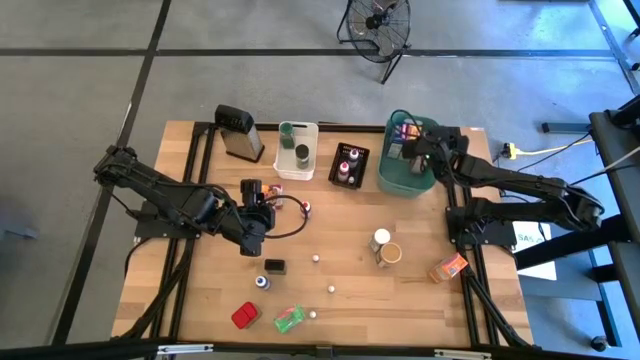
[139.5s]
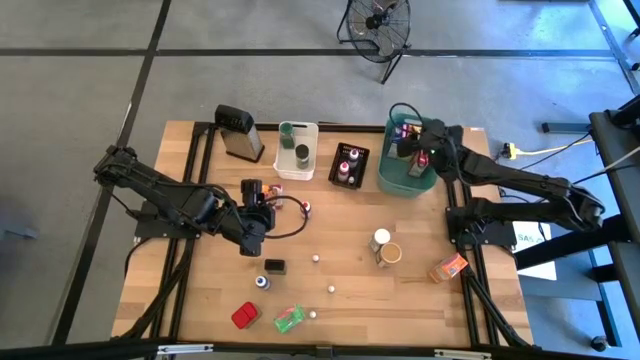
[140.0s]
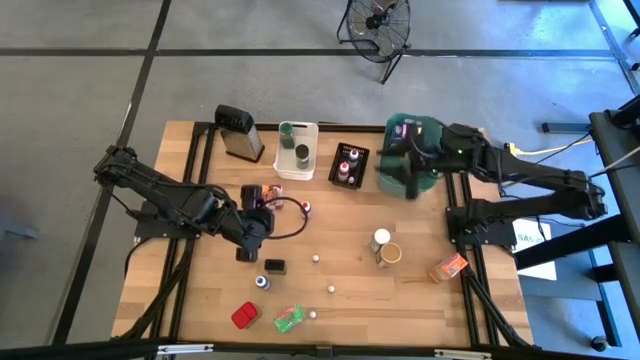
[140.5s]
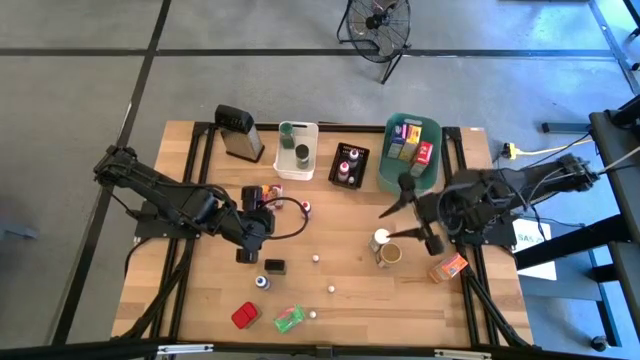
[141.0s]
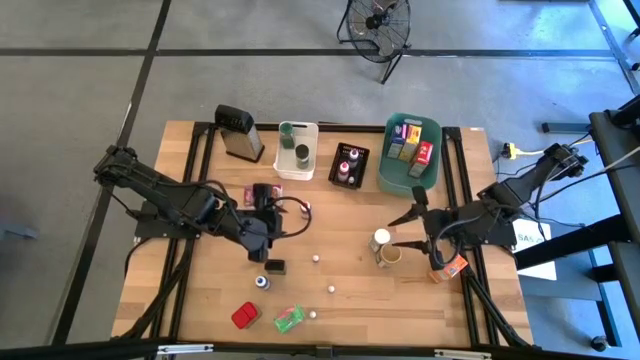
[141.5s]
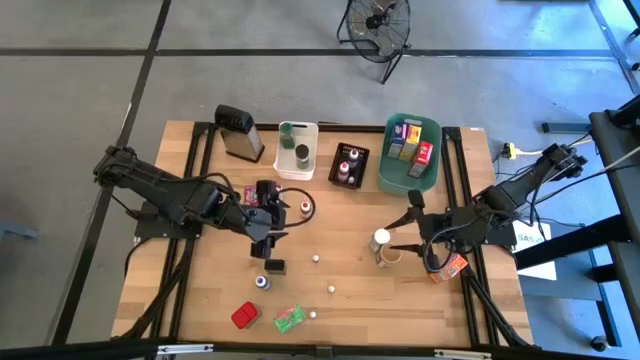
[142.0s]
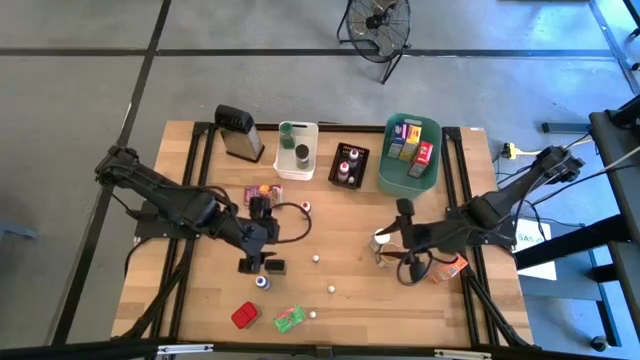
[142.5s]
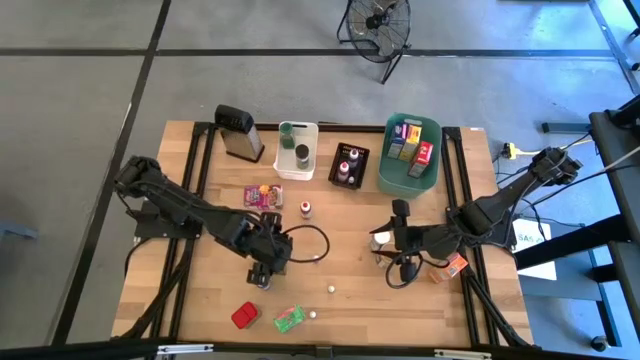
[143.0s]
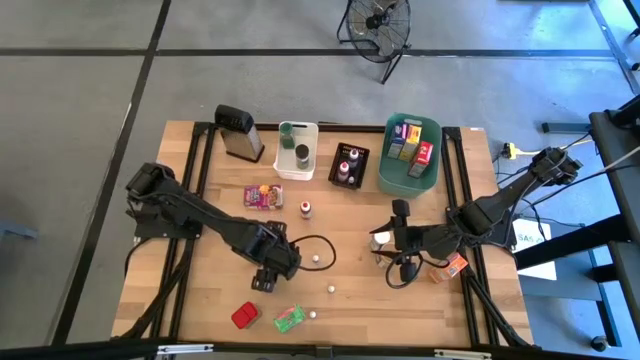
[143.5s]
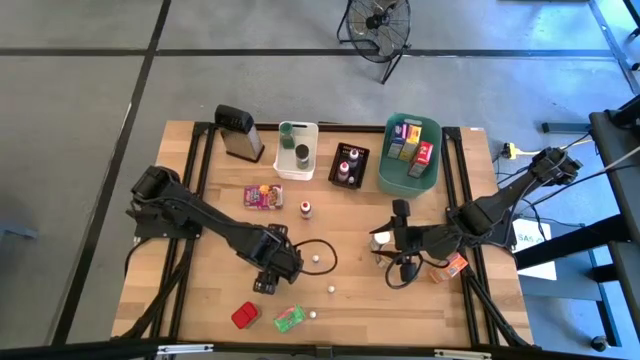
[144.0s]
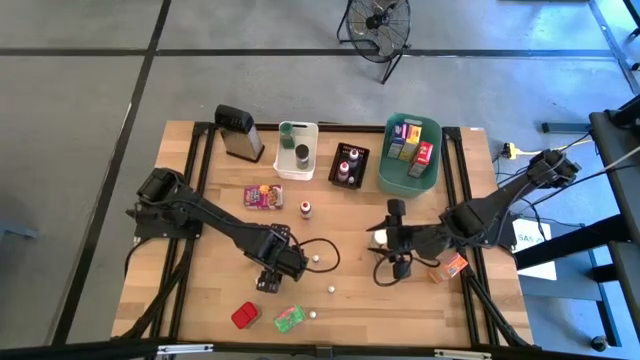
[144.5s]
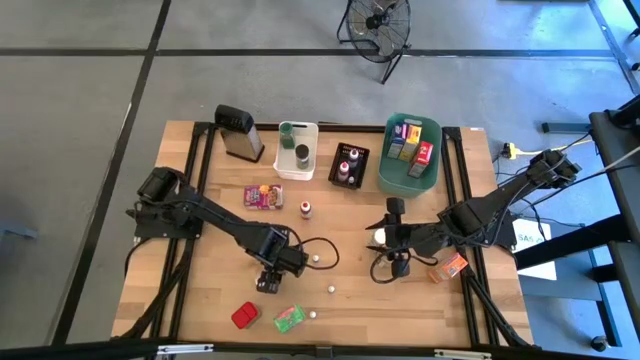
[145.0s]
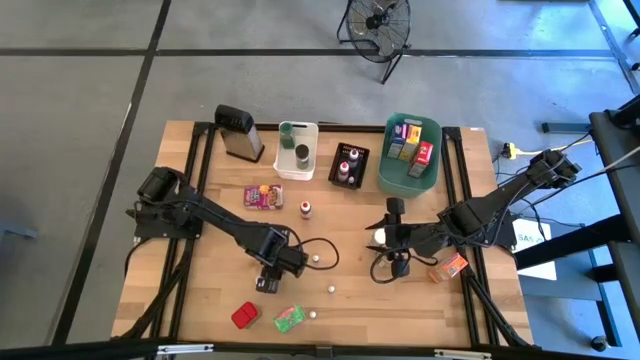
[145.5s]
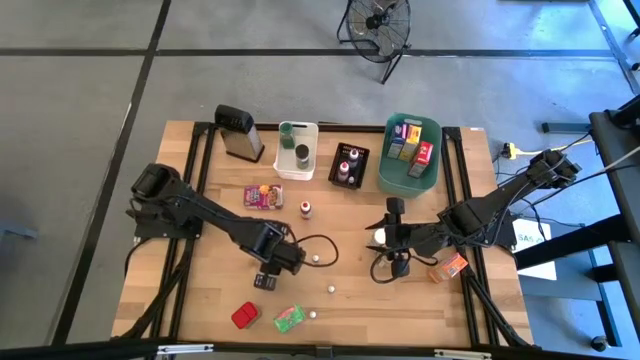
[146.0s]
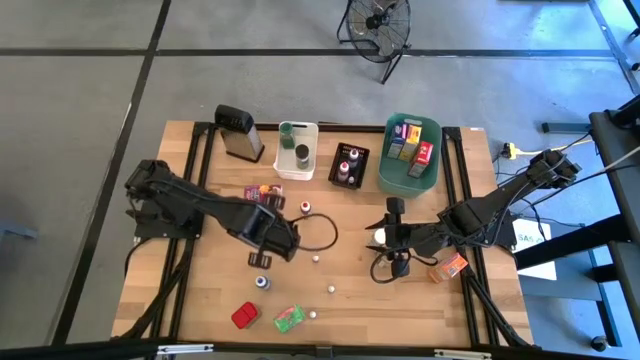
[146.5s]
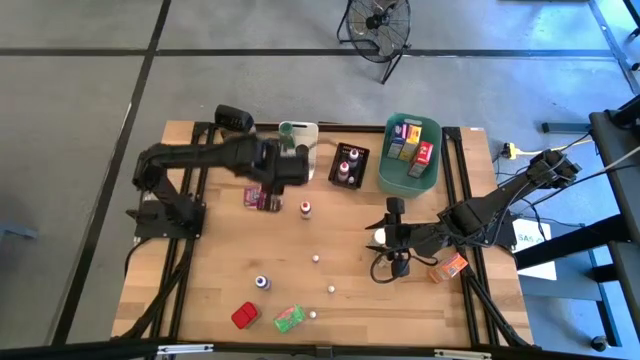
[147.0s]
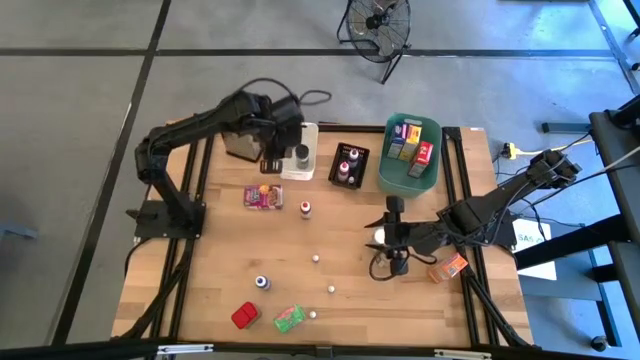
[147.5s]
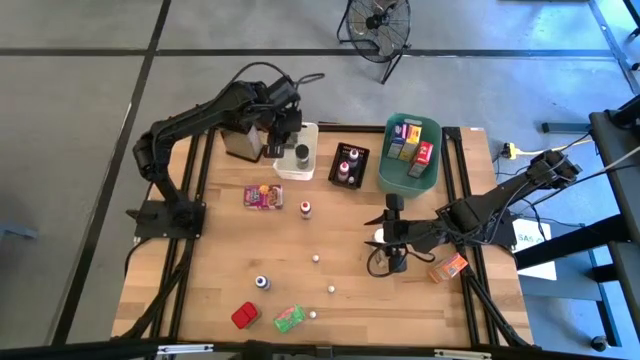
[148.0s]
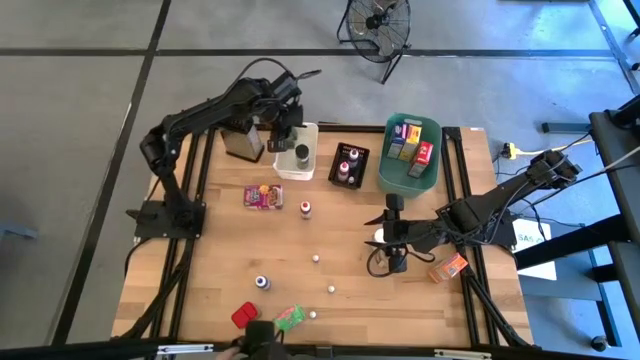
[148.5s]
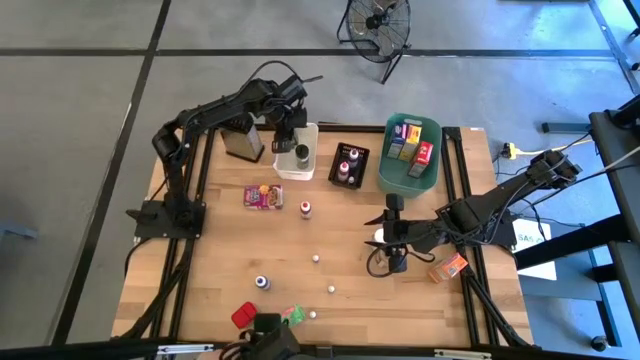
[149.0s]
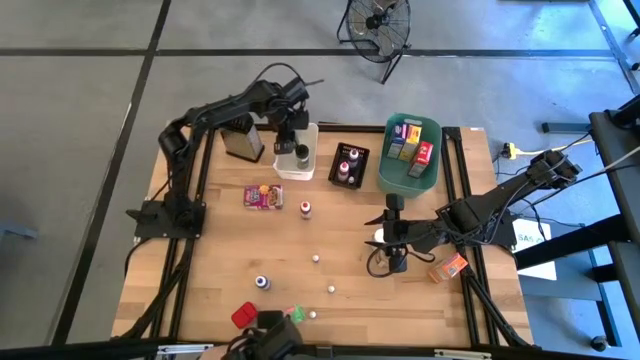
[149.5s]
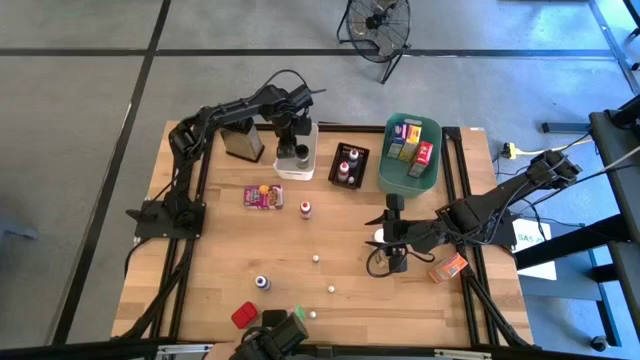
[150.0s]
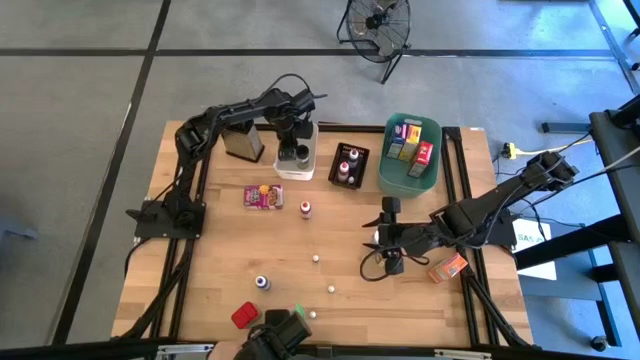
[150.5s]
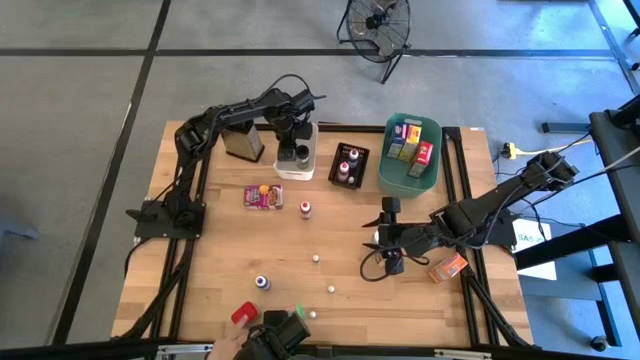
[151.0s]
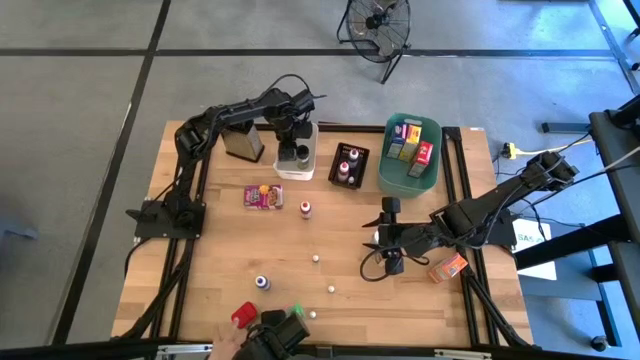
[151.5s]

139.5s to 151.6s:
Task: Pick & Place Kitchen Items
Put the black seasoning can into the white bin

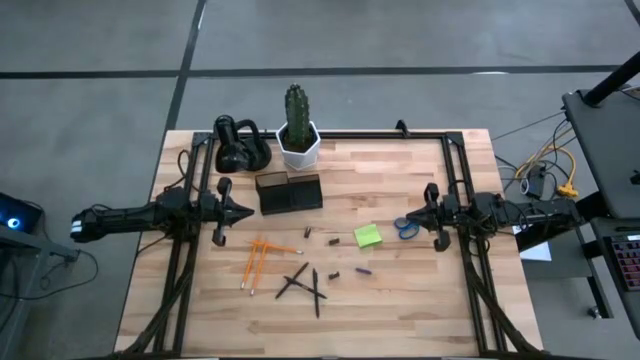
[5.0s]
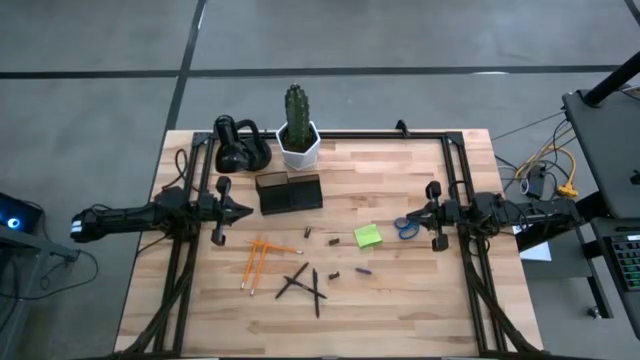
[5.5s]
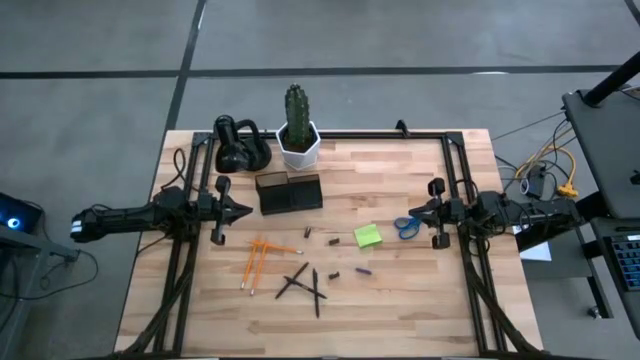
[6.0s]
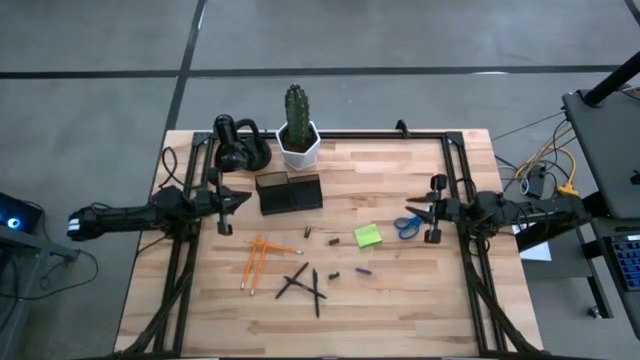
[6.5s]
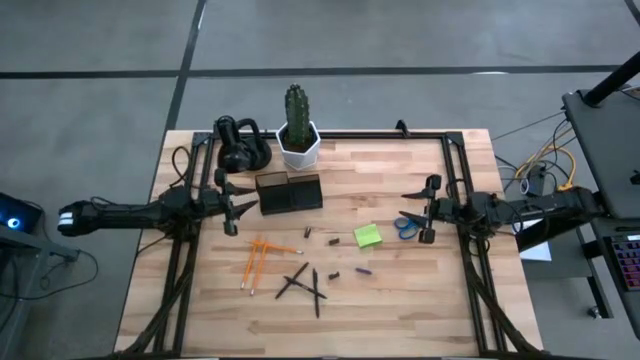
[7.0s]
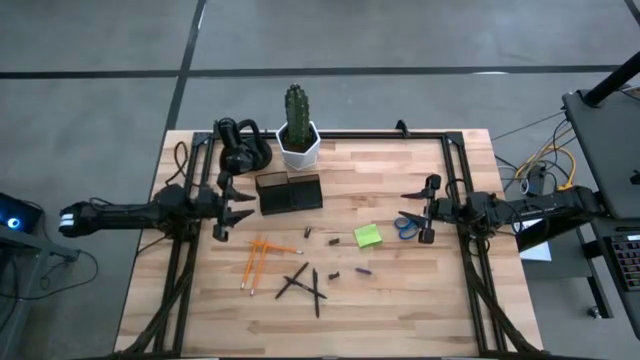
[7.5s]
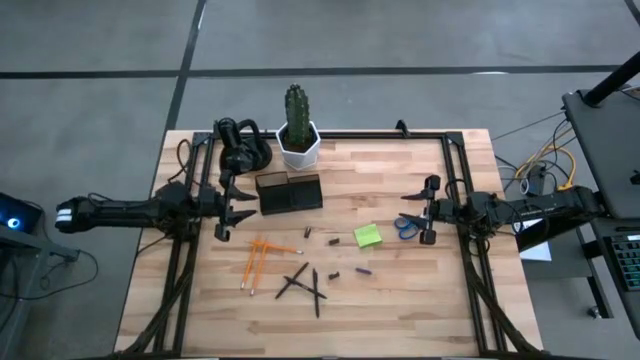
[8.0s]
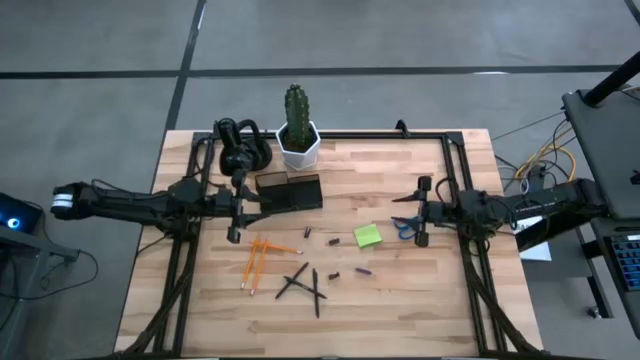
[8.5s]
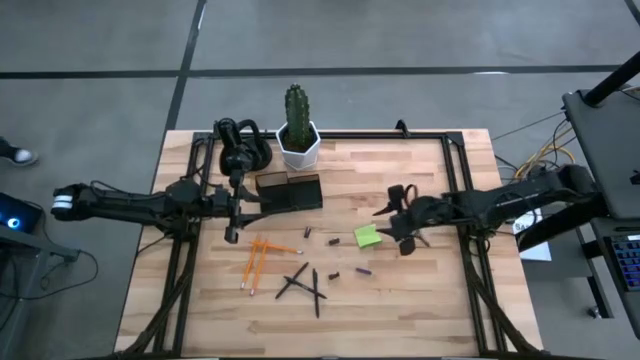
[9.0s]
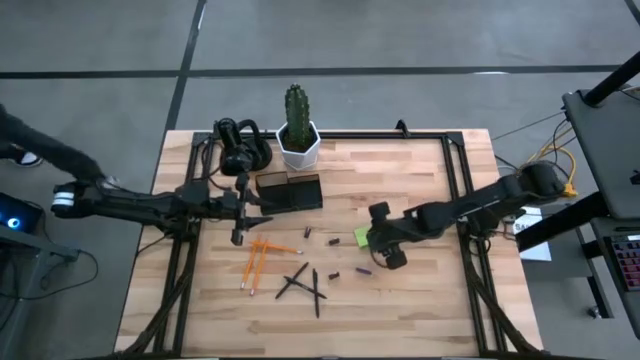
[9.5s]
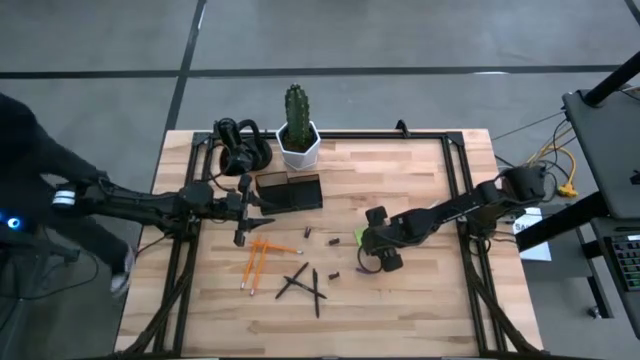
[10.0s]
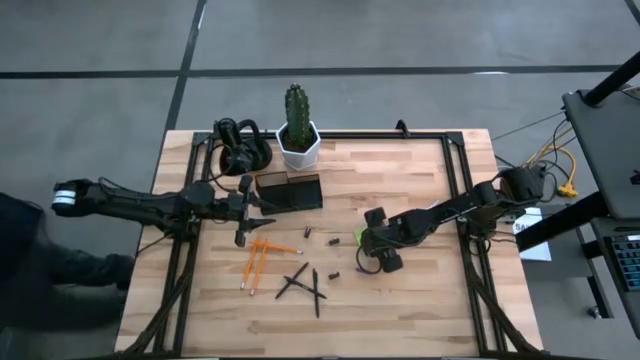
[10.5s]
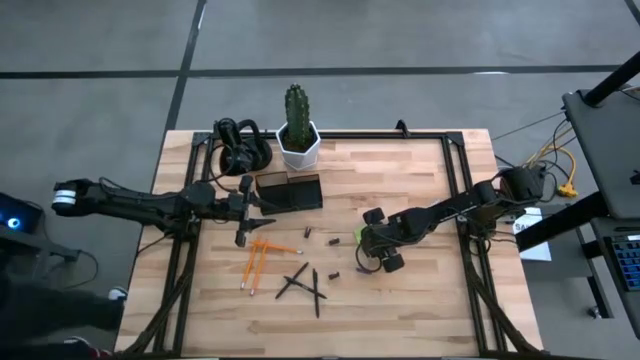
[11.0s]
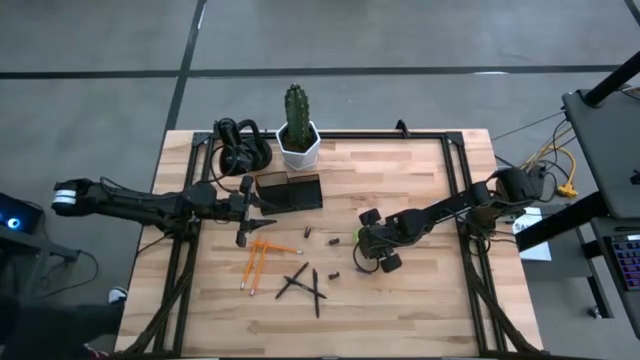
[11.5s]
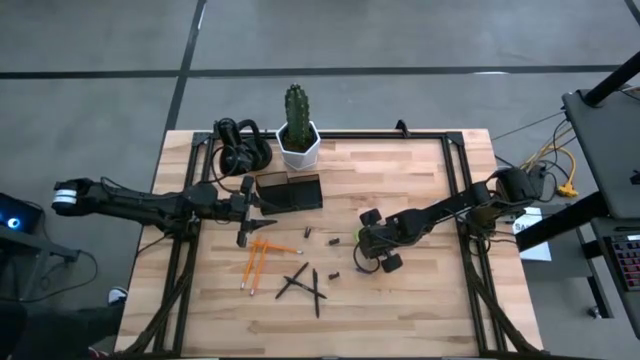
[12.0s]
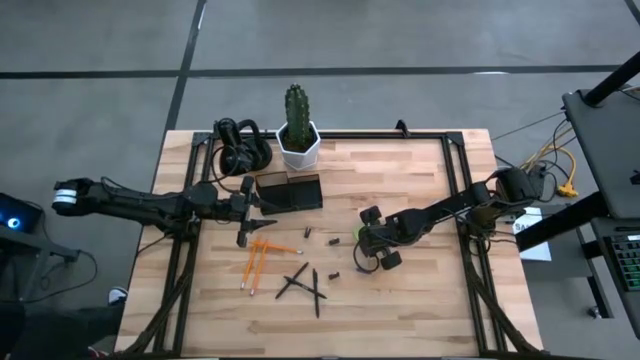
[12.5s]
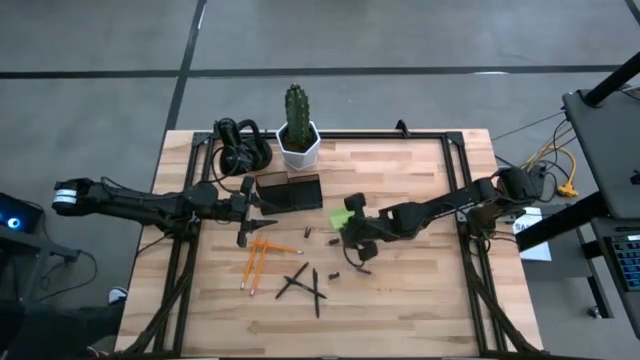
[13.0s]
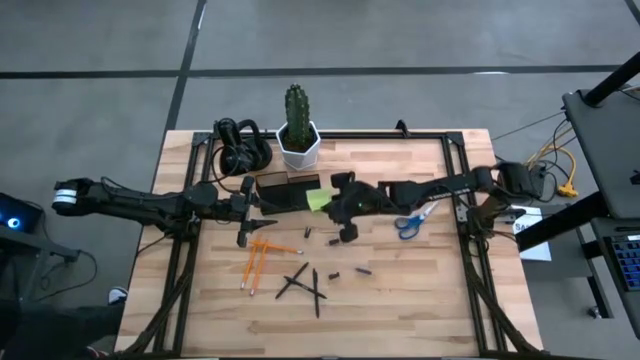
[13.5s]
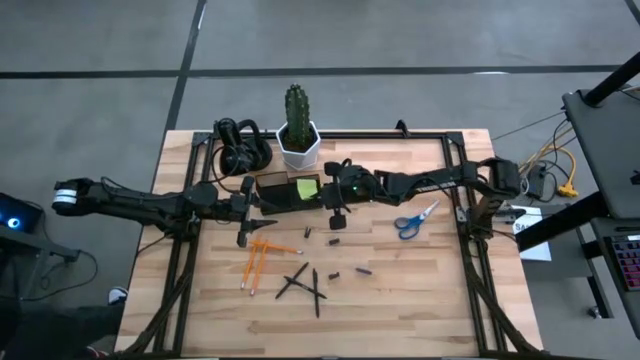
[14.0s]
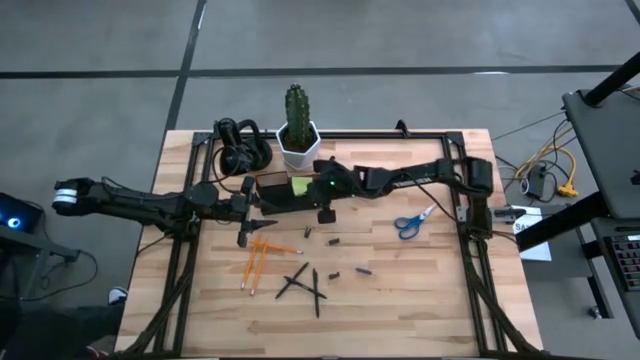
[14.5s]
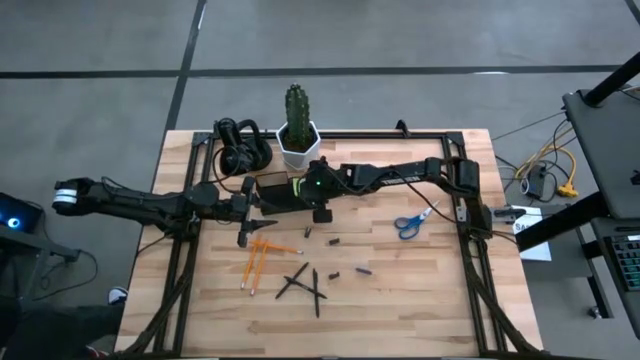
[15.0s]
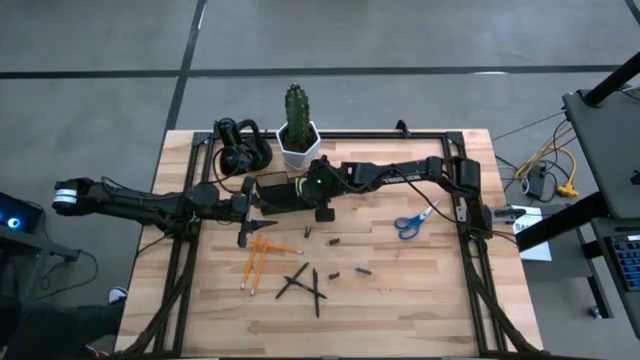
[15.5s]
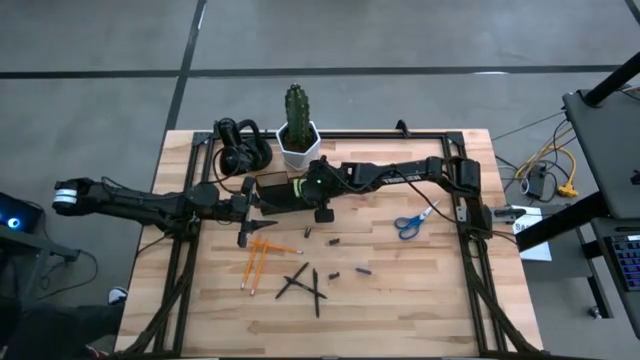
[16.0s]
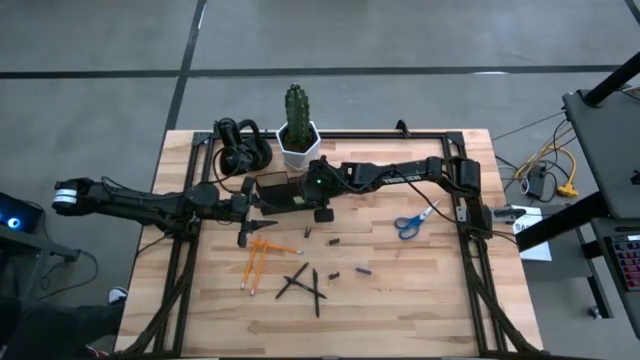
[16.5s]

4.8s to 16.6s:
Task: Pick and place office supplies into organizer
Put the green sticky note into the black desk organizer
